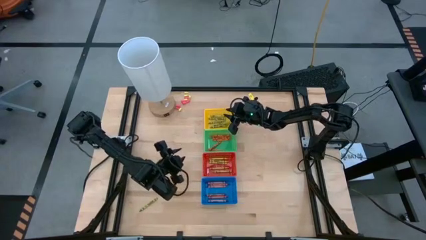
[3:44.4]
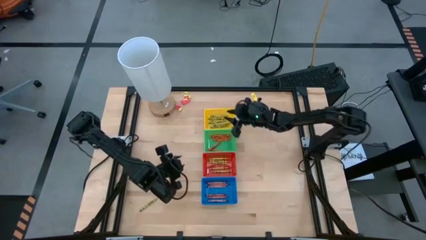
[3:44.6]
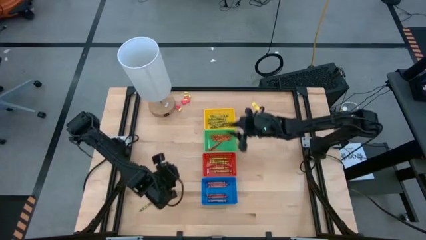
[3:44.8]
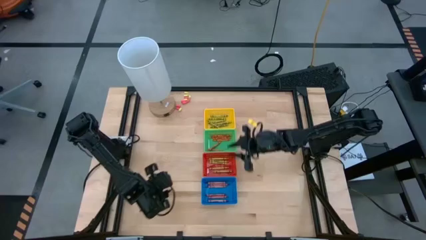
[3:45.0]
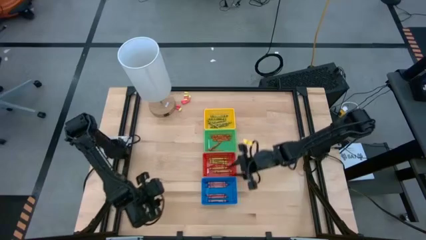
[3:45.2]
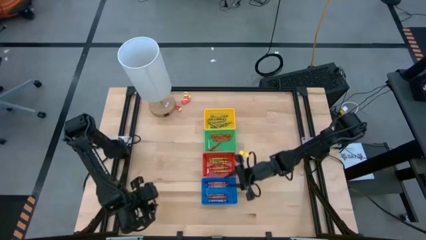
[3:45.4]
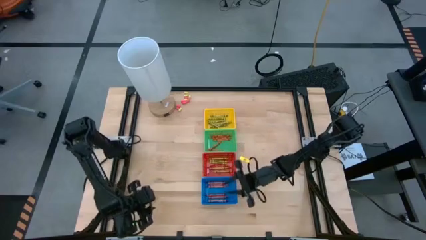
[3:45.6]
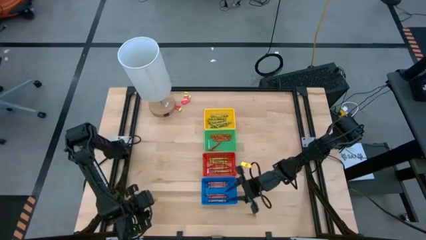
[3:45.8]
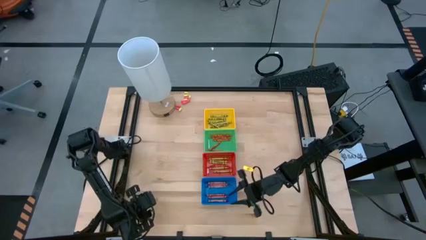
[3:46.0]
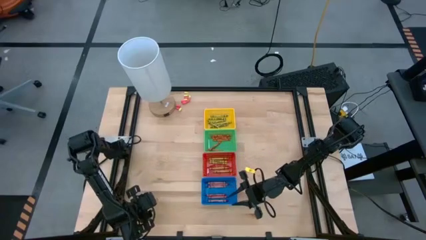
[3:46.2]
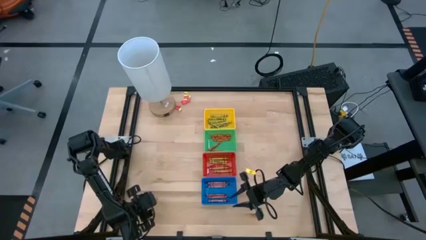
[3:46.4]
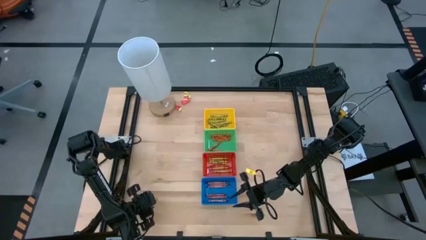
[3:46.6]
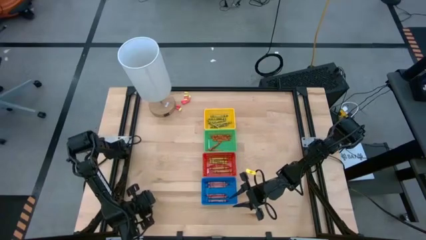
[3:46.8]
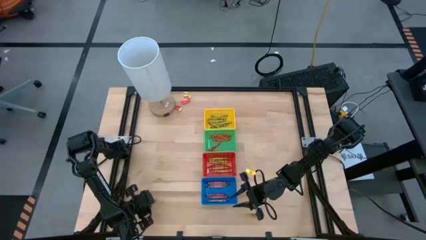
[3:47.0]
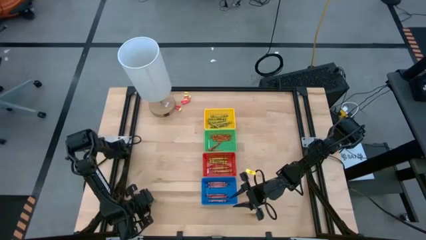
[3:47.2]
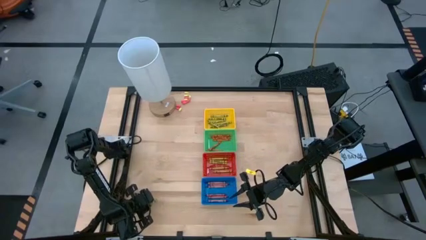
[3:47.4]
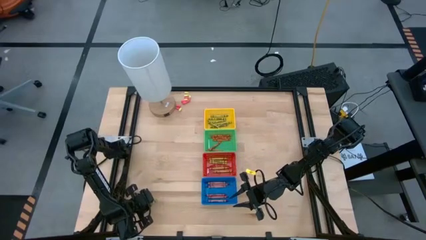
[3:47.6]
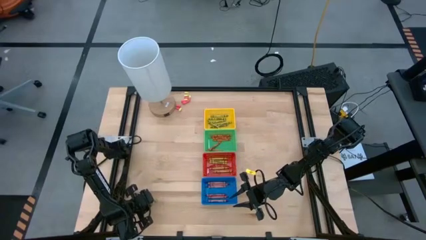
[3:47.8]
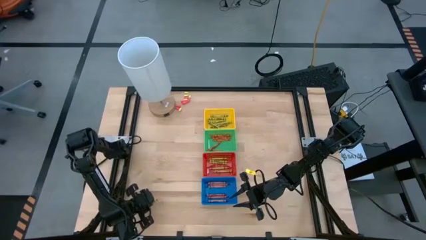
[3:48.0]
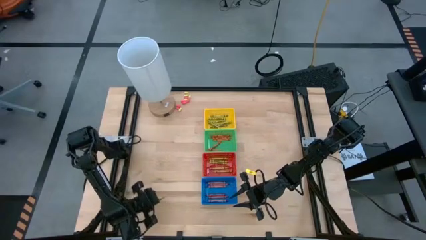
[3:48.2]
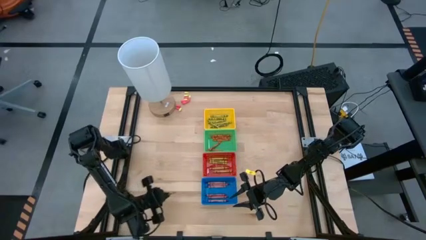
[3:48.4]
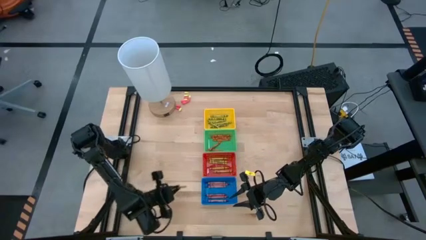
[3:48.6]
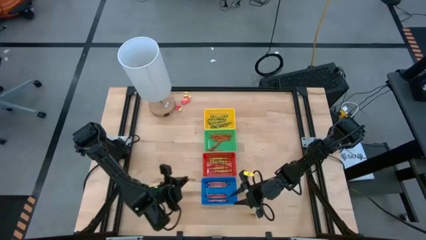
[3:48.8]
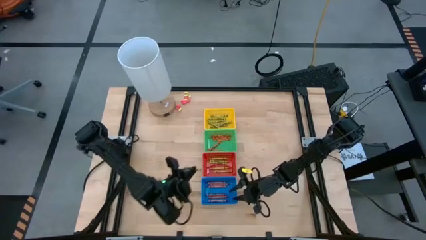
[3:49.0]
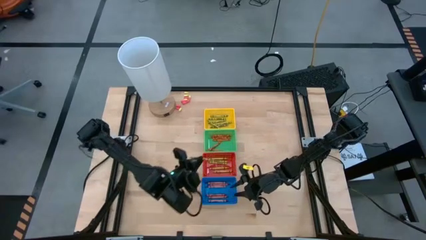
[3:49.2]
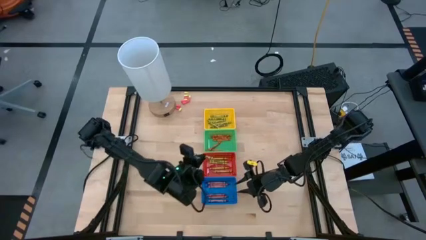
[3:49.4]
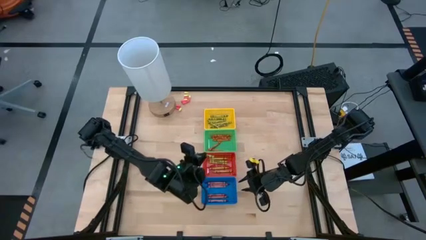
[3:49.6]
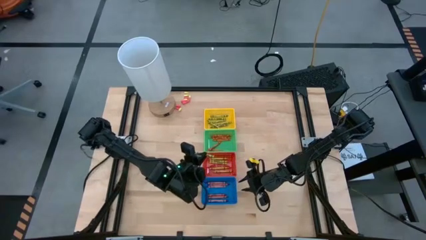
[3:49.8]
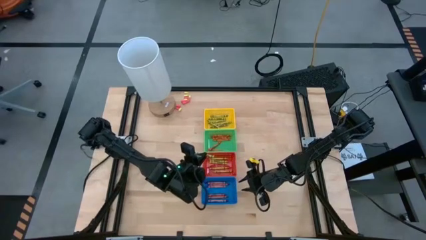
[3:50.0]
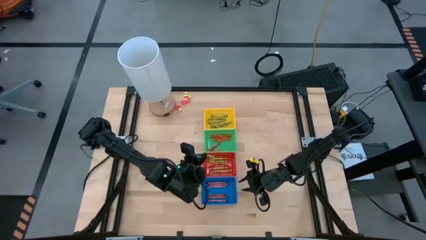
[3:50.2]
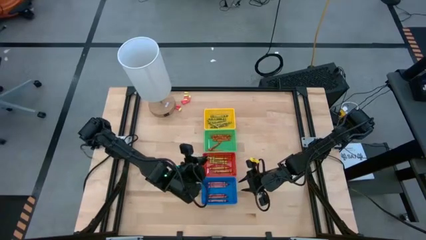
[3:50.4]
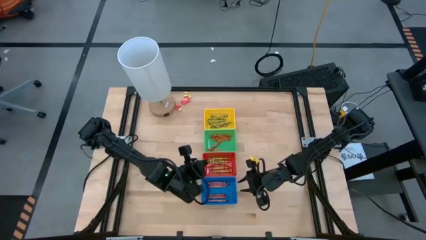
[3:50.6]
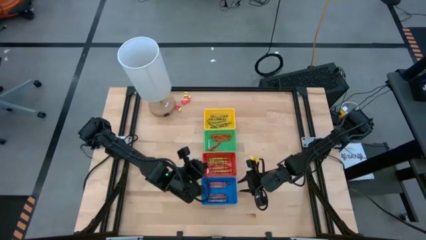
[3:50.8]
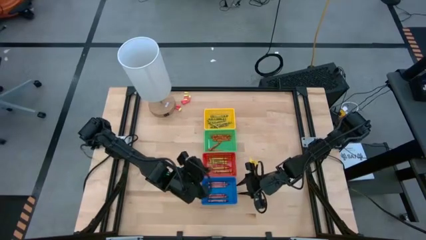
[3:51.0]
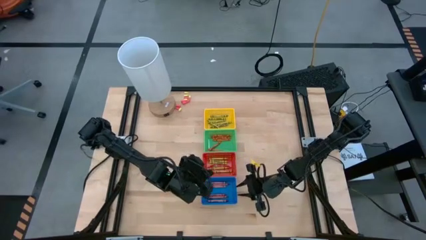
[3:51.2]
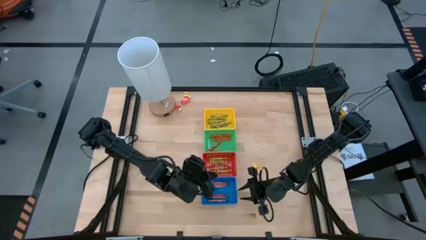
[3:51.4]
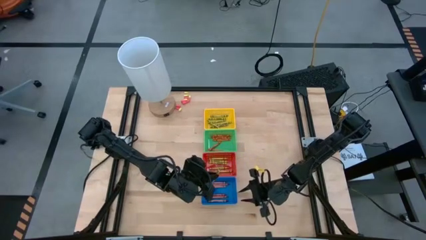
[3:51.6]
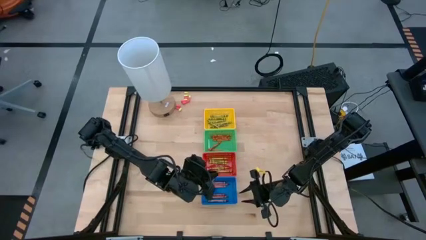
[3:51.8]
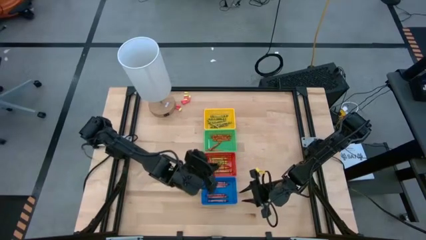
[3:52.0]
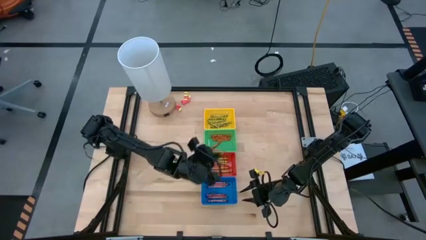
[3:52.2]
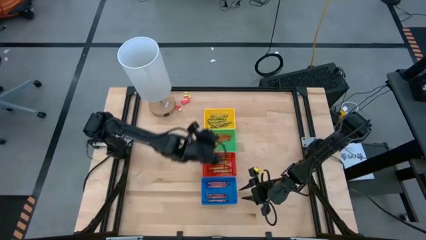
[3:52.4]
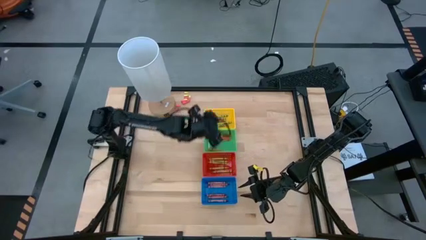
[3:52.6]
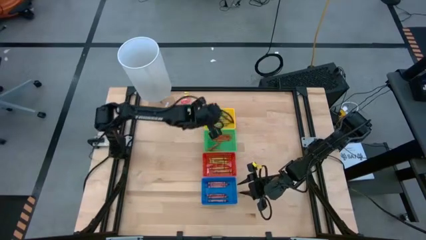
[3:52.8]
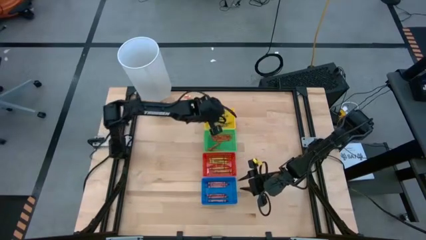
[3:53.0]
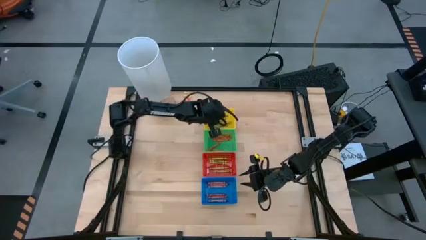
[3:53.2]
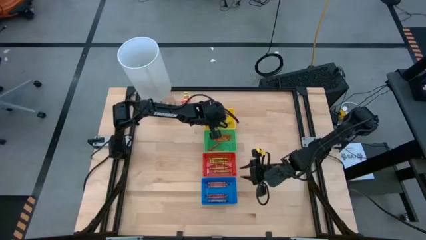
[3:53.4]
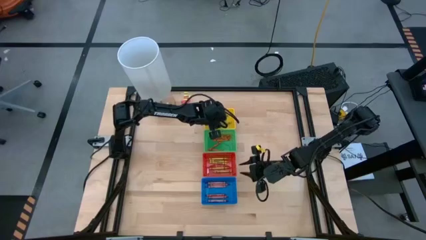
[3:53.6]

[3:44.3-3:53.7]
Task: Sort crayons
Put the green crayon into the yellow bin

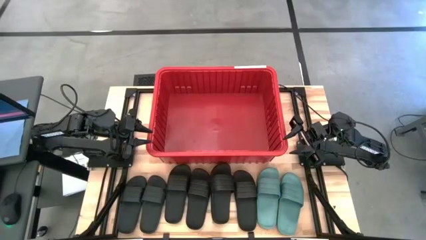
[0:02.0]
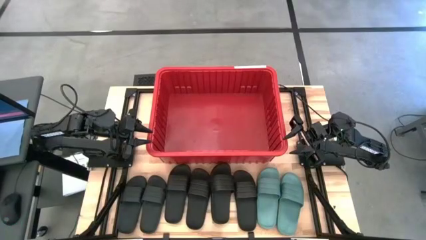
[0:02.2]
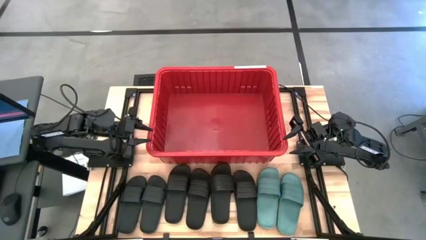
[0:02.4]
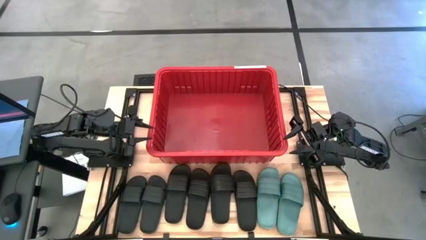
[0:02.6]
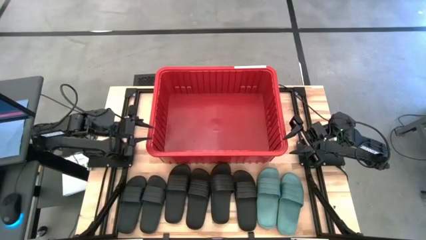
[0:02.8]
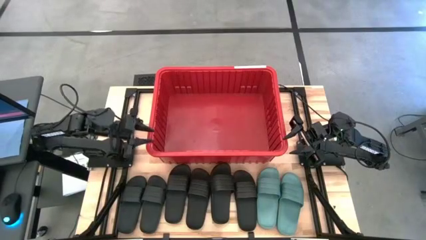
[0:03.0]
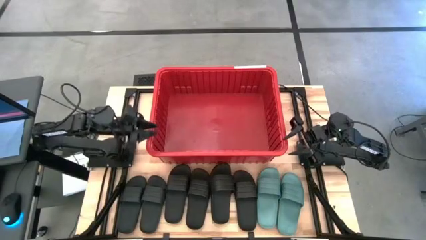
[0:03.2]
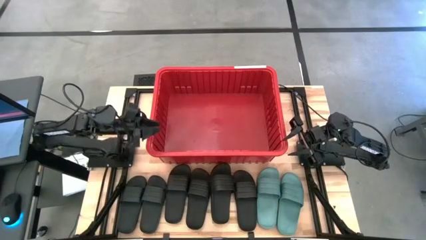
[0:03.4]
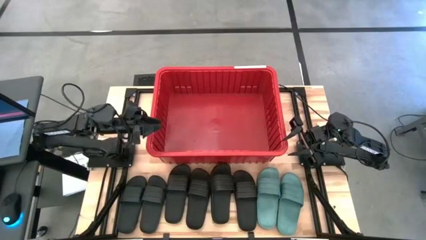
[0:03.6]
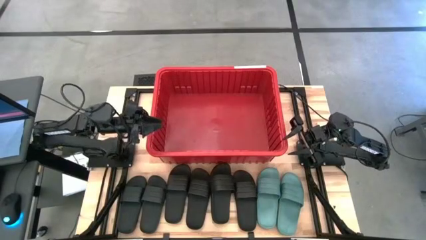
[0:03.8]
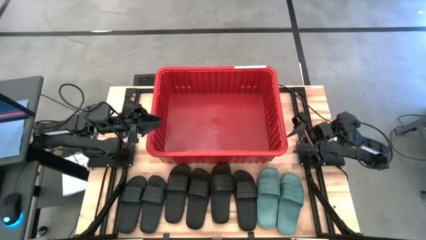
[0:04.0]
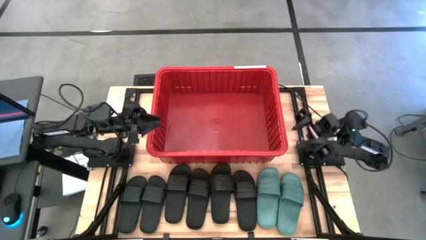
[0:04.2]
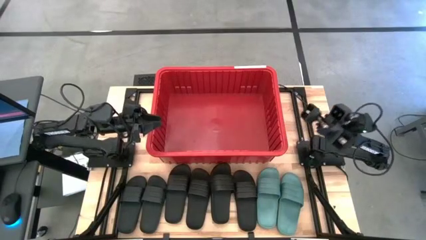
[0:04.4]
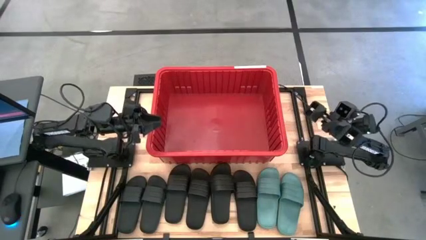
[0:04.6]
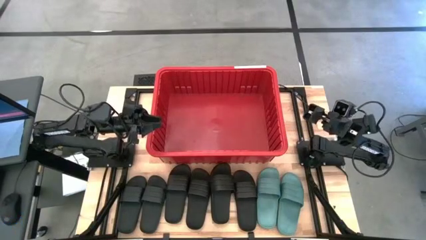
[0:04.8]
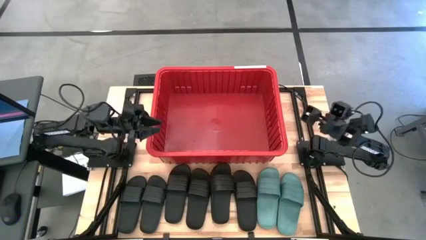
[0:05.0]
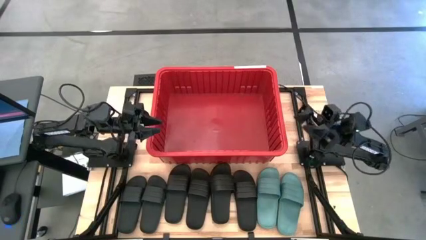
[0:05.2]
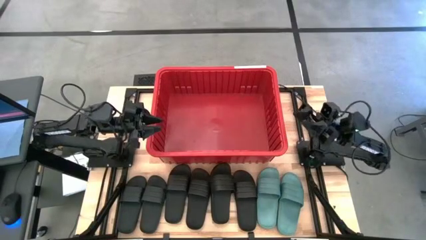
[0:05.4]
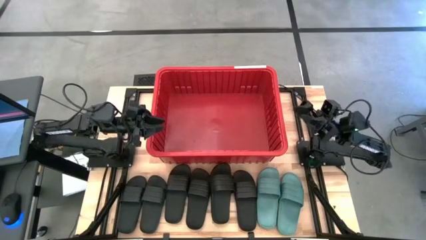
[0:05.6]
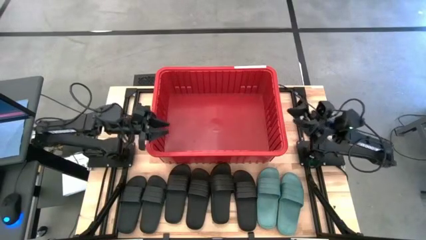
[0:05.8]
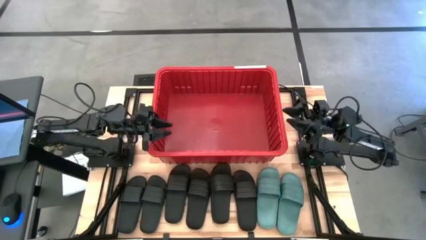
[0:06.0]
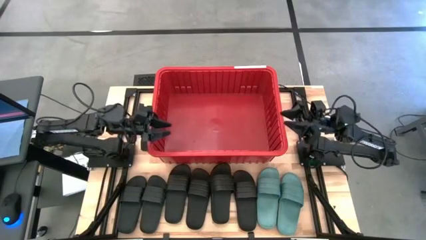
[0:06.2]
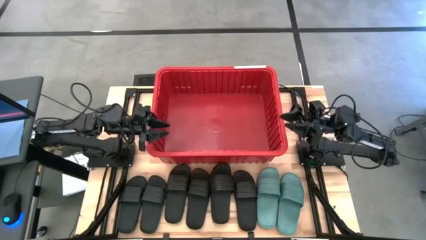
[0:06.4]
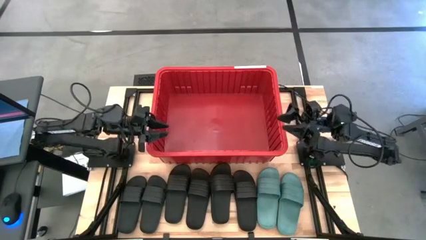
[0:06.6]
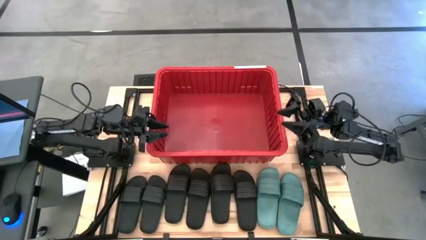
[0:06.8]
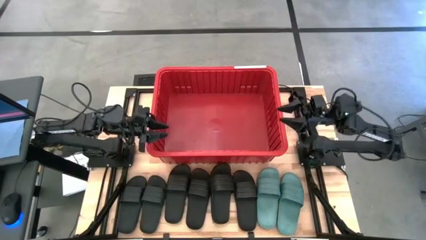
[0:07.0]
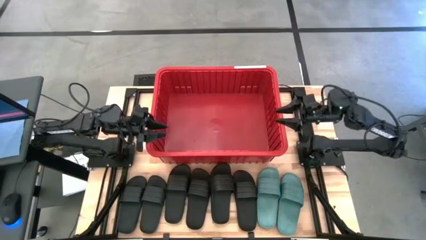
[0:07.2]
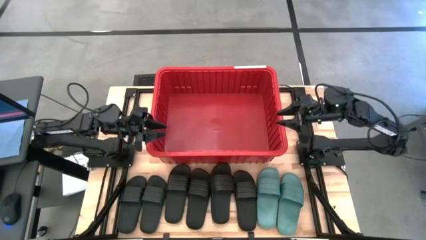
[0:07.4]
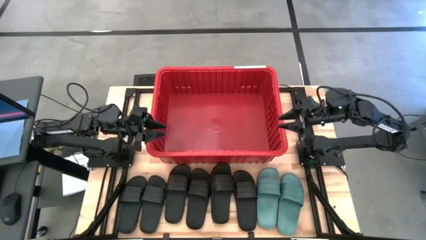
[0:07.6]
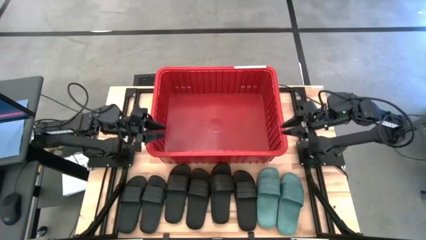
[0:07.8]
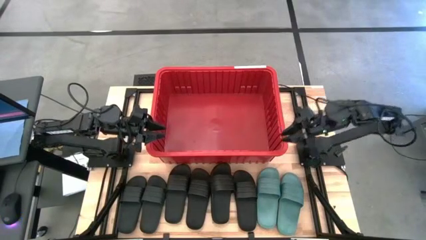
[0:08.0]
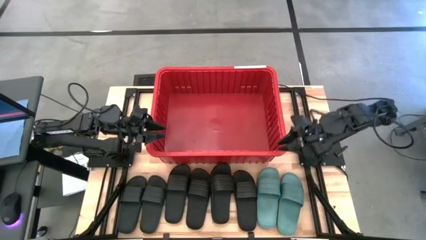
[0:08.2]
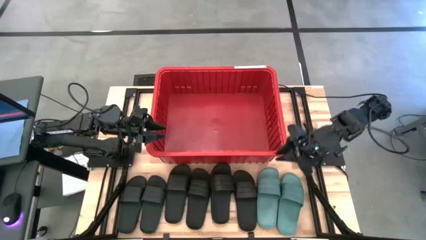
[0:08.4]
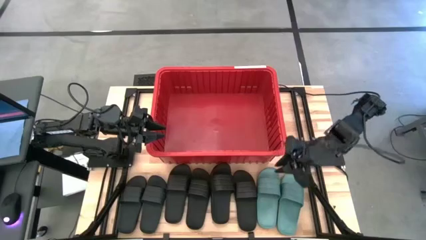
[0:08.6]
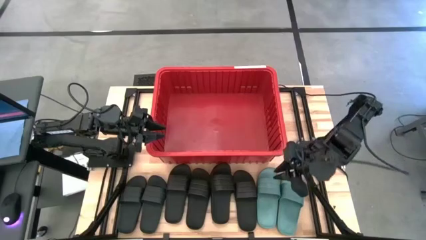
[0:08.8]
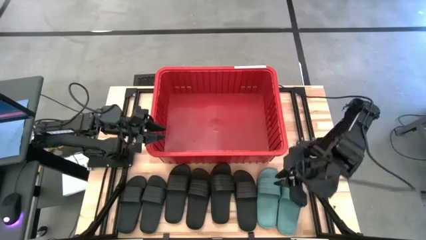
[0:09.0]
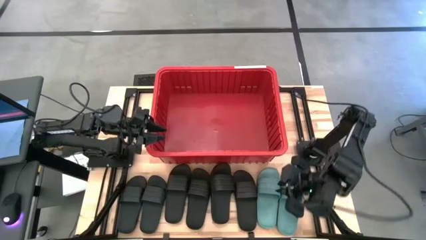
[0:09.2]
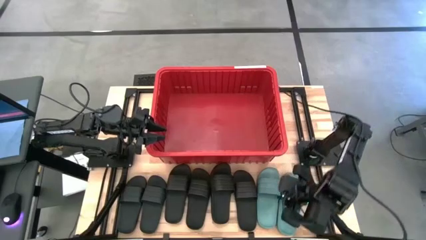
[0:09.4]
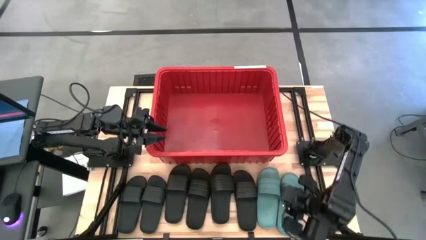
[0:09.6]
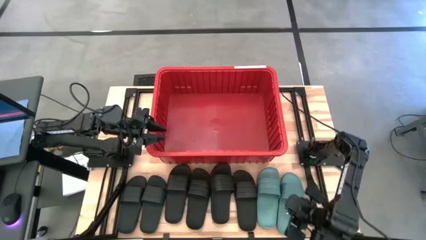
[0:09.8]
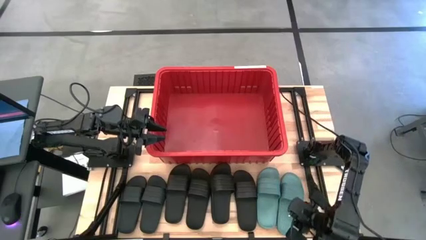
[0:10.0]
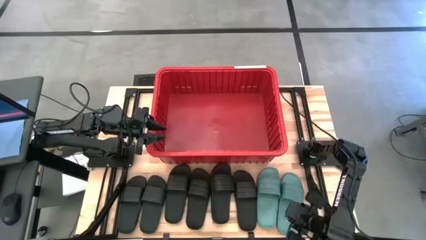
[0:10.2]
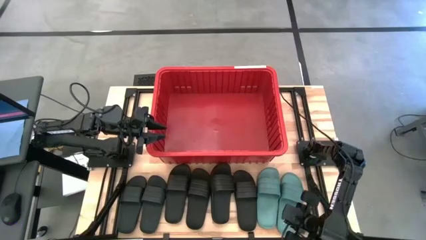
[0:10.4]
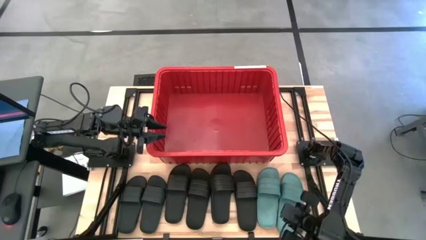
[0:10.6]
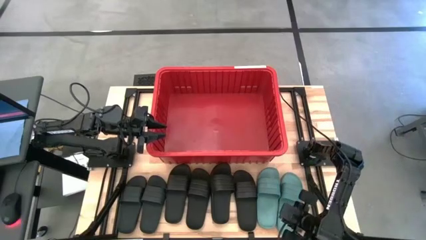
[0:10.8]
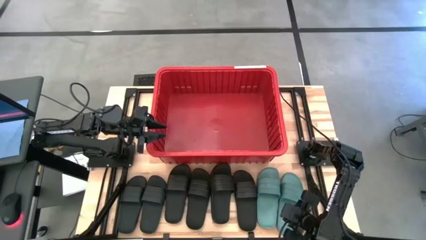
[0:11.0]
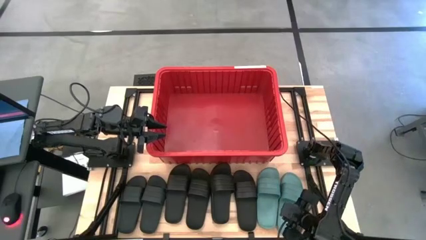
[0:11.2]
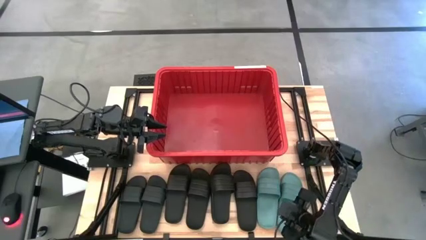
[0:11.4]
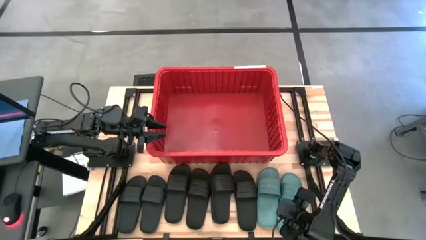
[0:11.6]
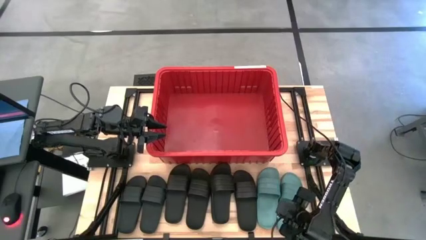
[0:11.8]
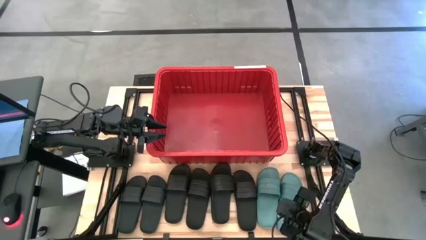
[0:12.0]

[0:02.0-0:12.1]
Task: Pick and place slides into bin
Put the right light green slipper into the red organizer bin
